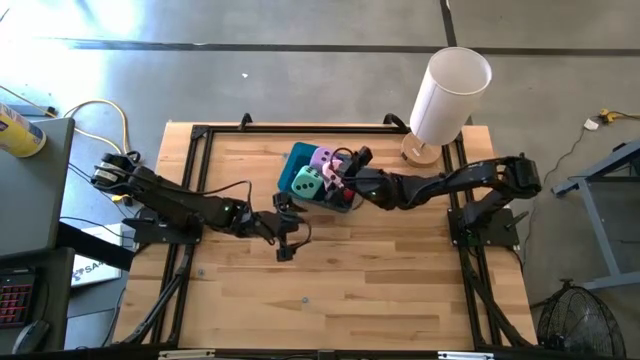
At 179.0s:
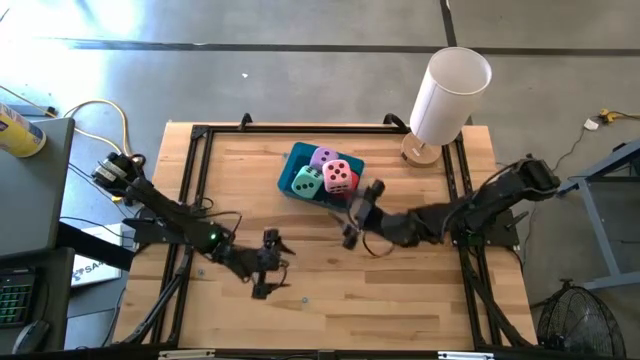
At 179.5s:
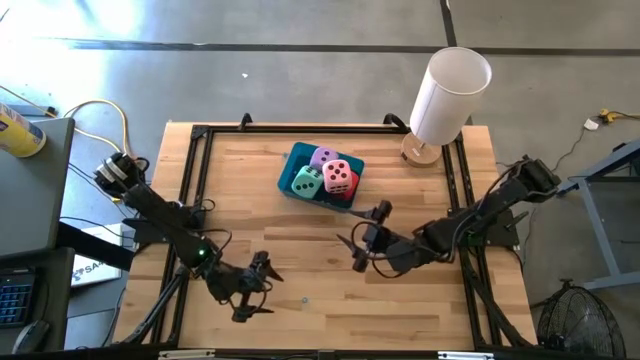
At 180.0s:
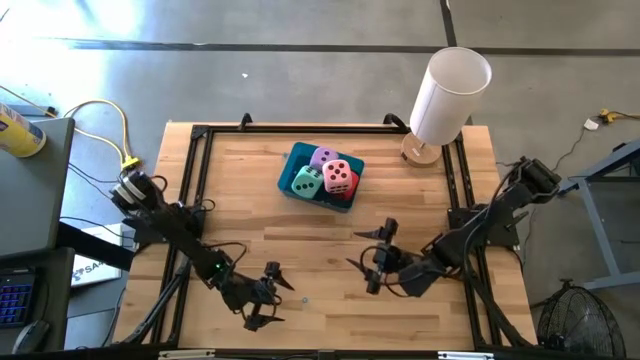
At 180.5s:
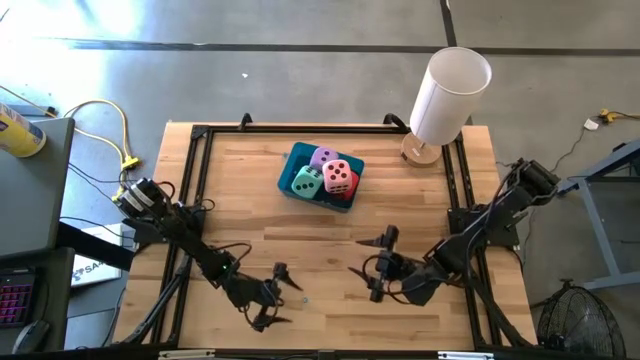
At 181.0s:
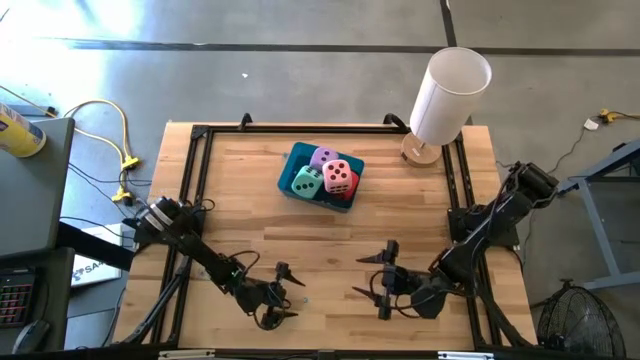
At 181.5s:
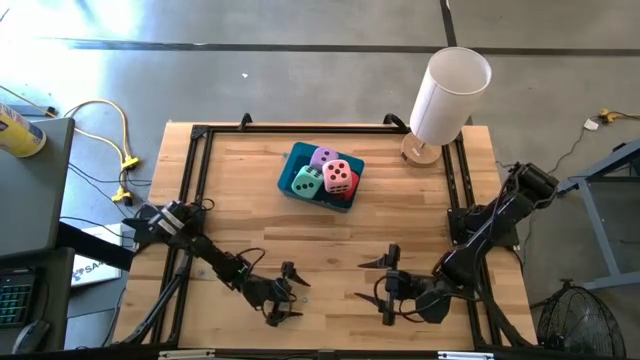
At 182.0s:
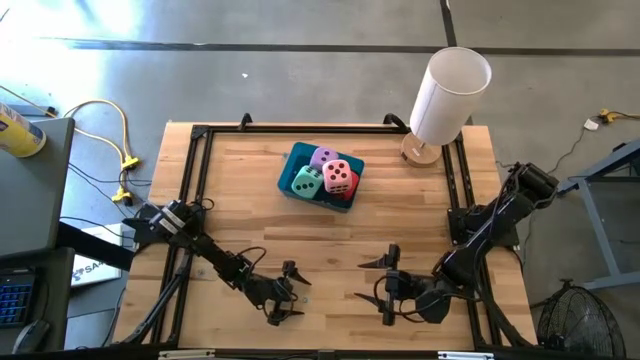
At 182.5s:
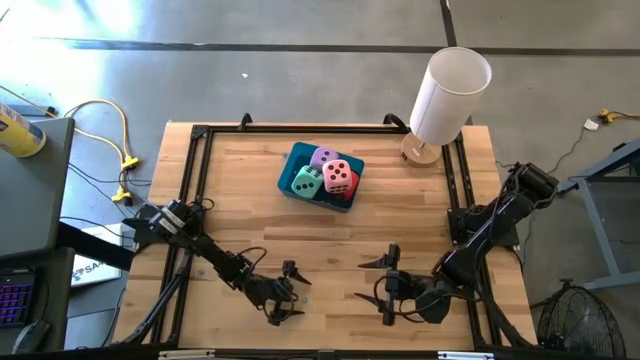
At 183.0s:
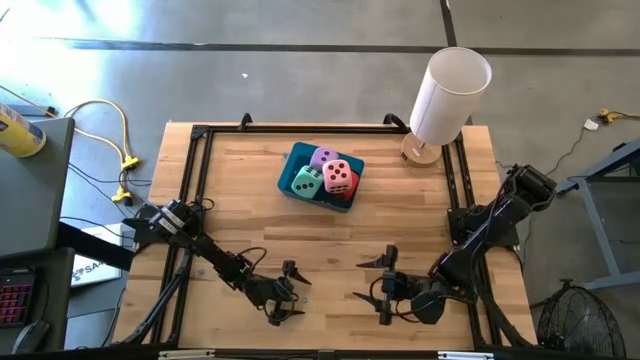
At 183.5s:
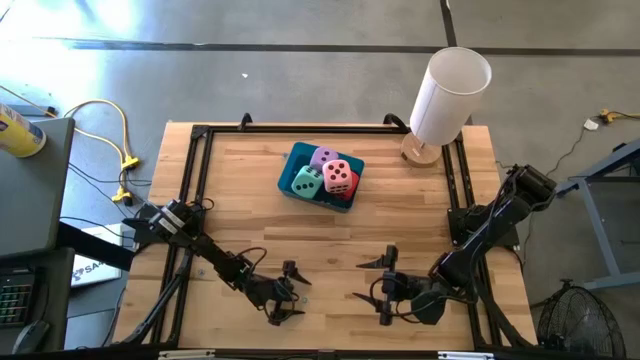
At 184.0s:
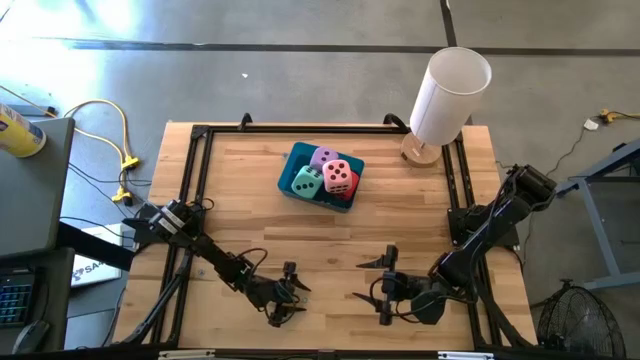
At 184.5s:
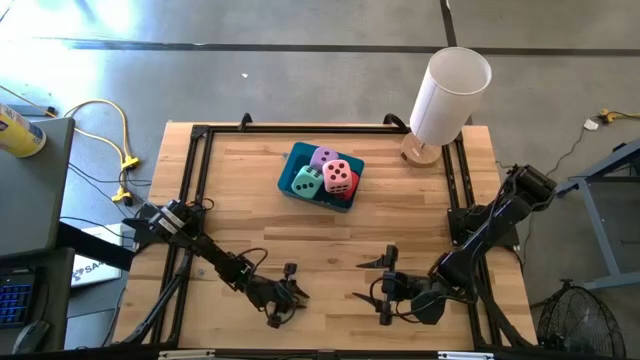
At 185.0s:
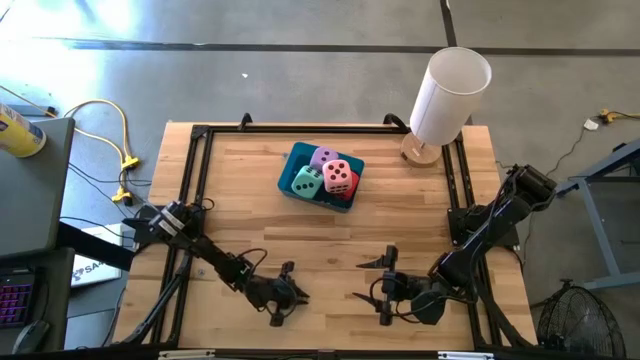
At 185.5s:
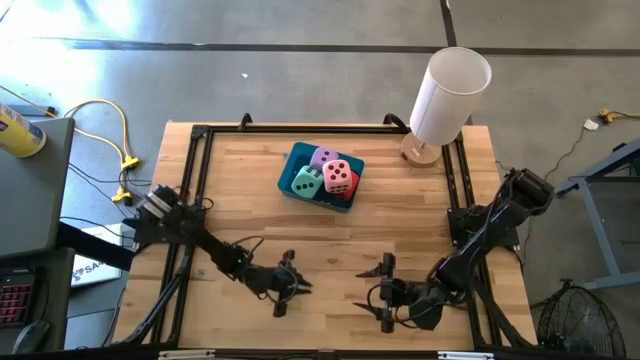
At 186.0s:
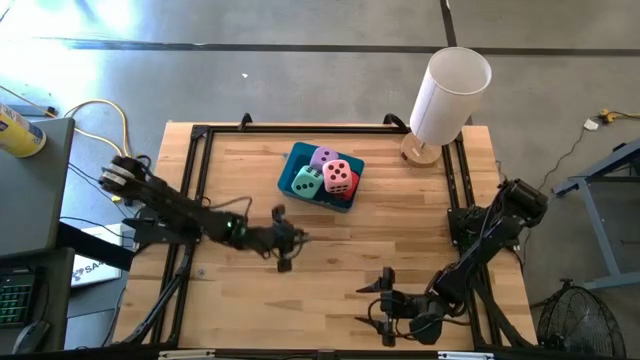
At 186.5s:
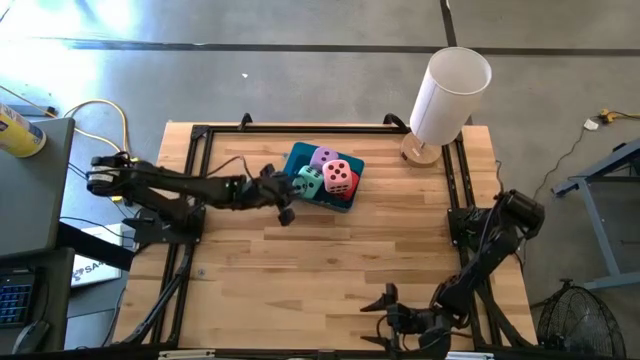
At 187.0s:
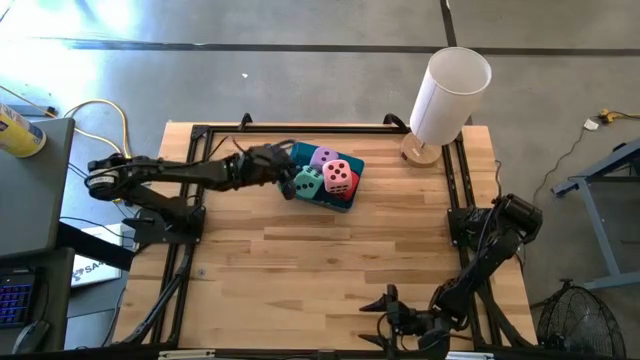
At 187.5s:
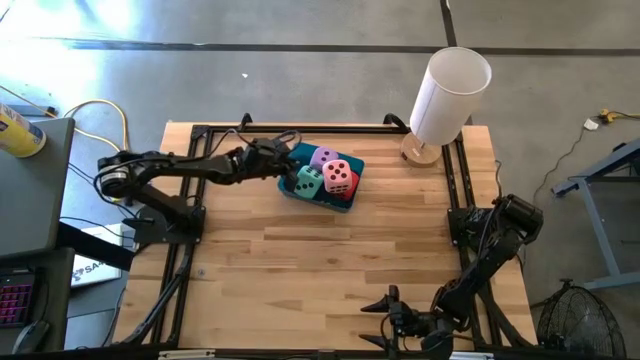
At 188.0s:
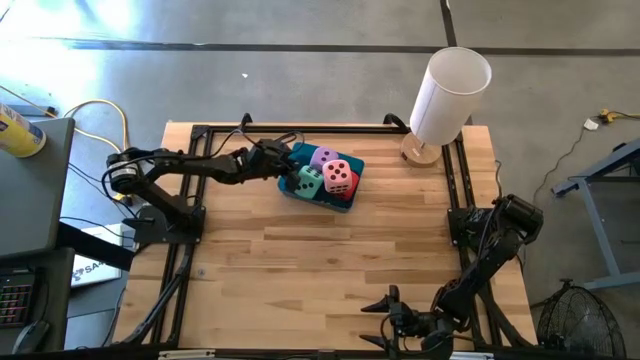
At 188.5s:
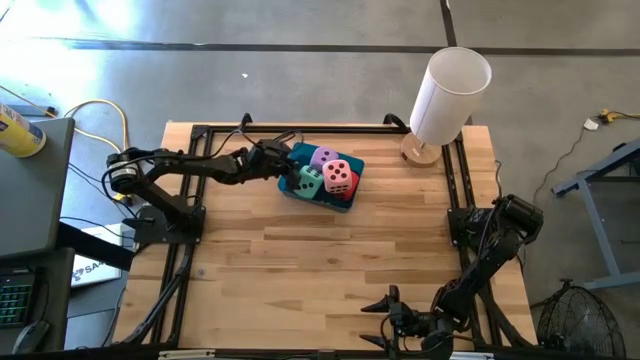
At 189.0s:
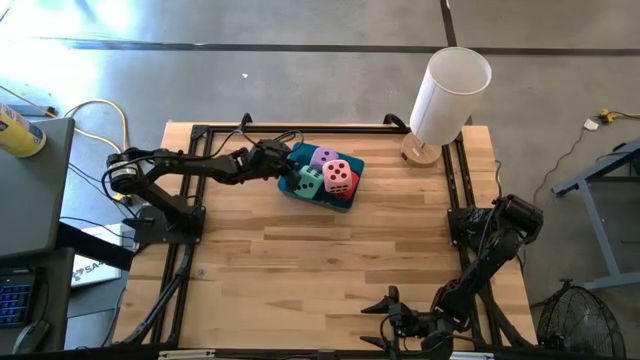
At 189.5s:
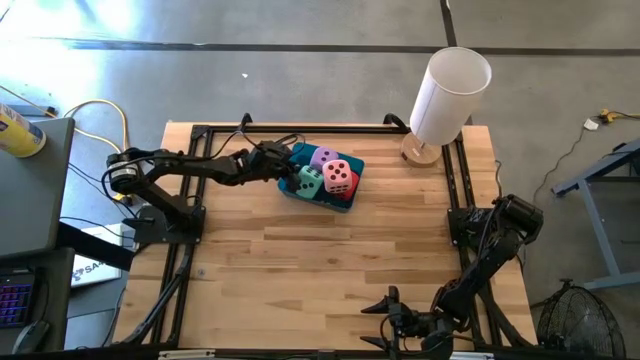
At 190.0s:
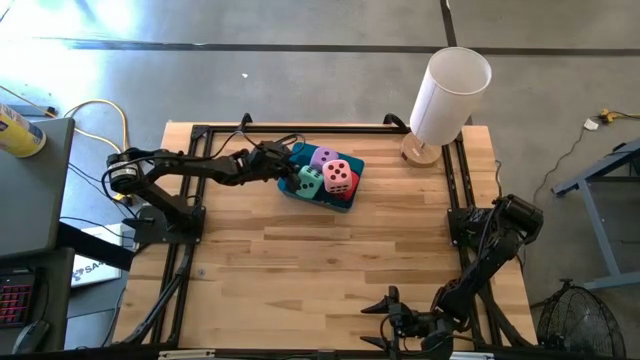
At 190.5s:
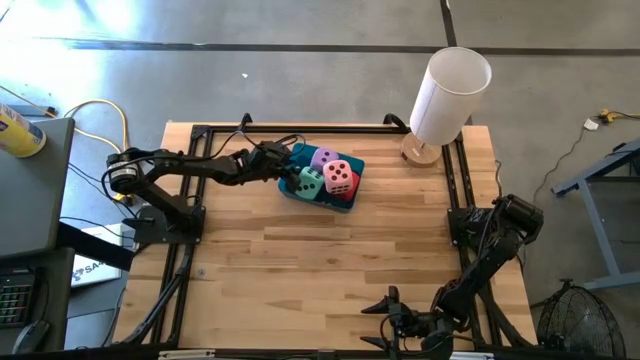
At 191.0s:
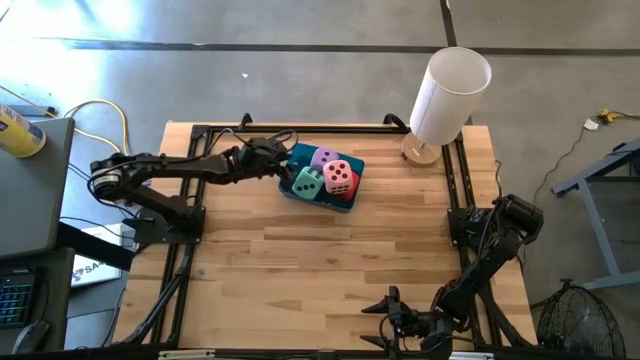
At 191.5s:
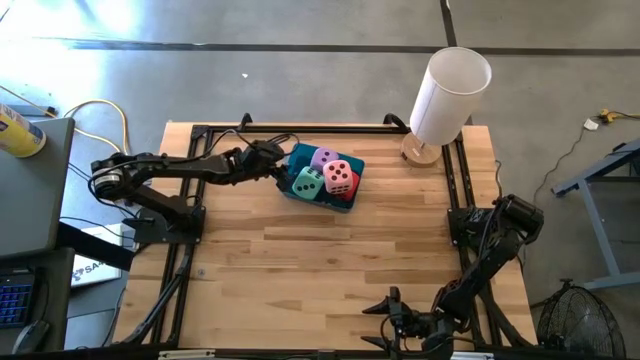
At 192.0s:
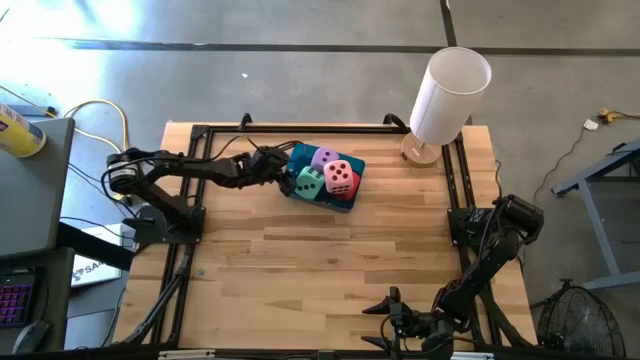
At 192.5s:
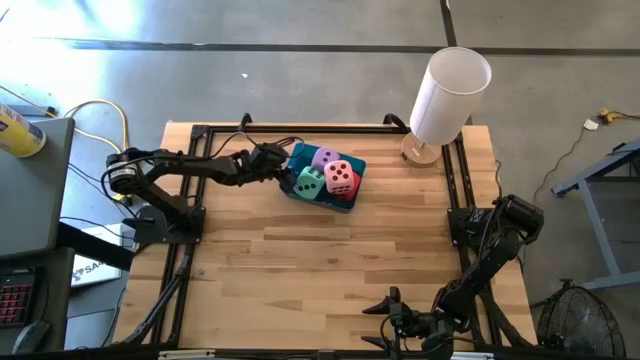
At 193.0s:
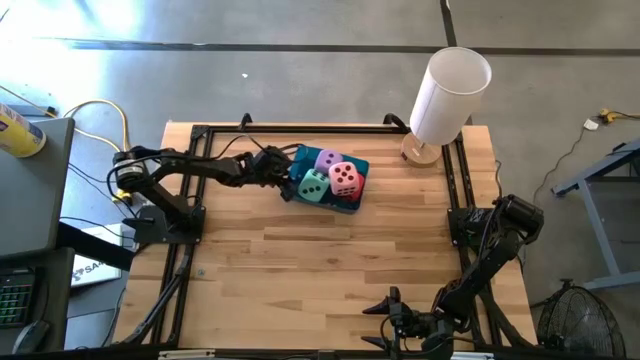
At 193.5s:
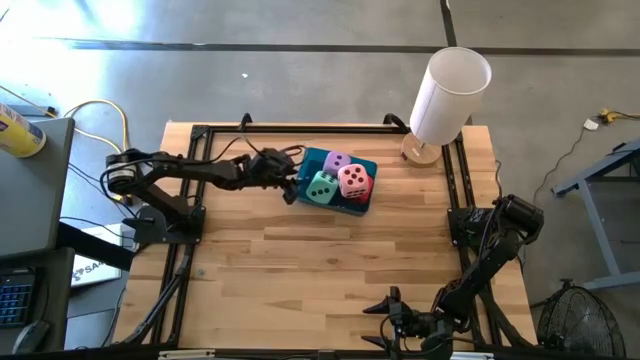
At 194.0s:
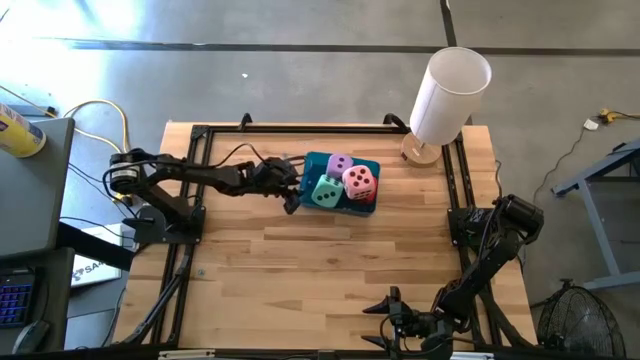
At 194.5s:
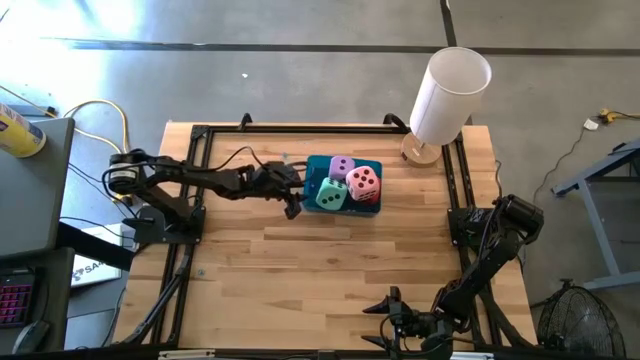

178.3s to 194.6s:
Task: Pick & Place Dice
Put the small blue dice into the blue bin

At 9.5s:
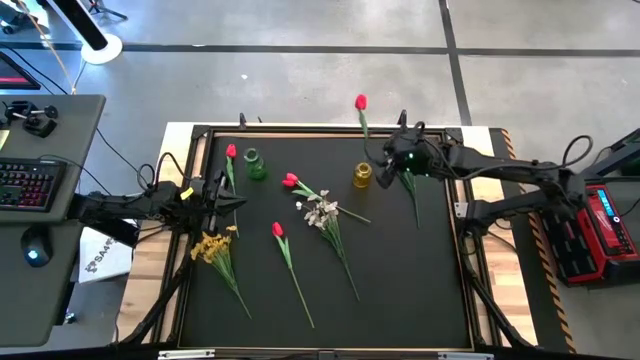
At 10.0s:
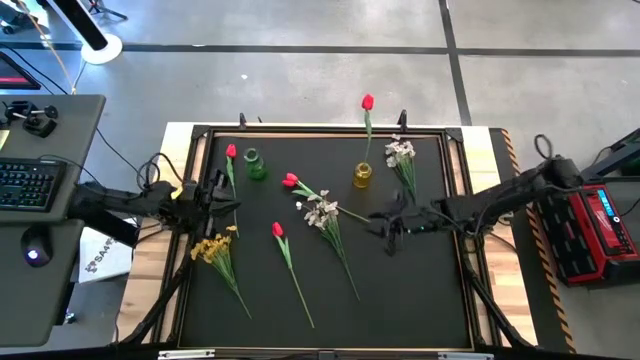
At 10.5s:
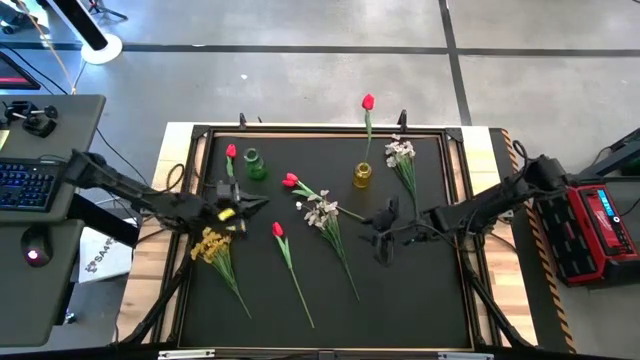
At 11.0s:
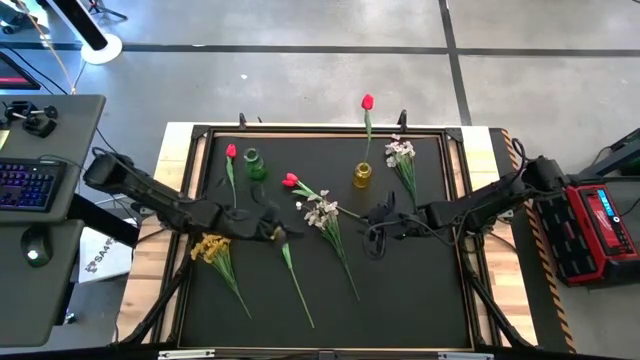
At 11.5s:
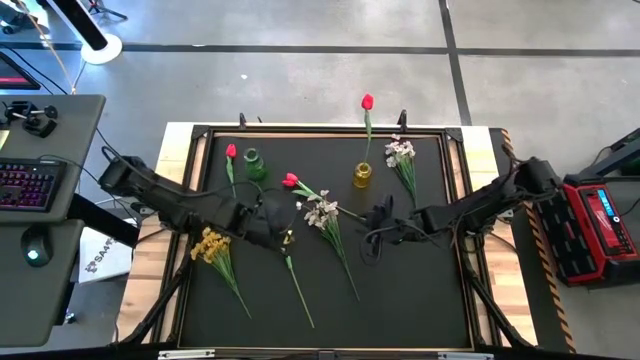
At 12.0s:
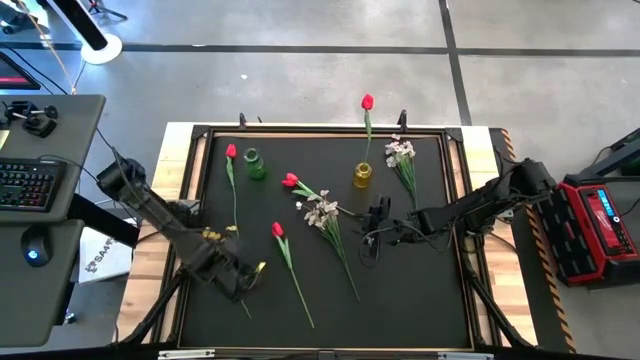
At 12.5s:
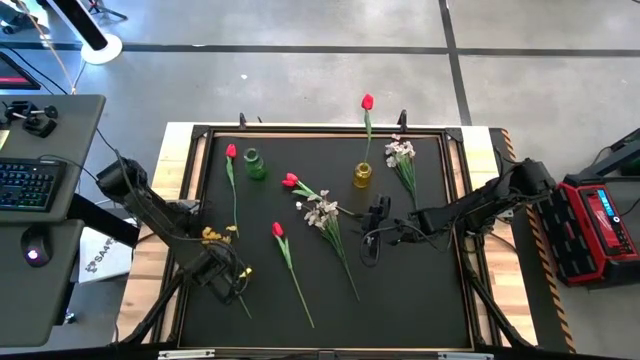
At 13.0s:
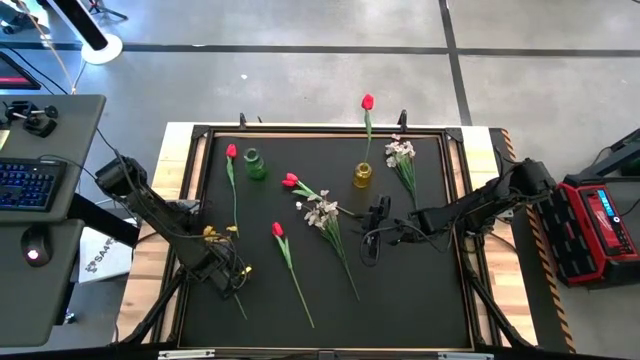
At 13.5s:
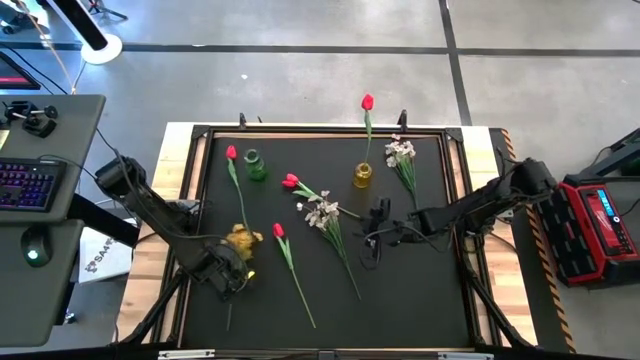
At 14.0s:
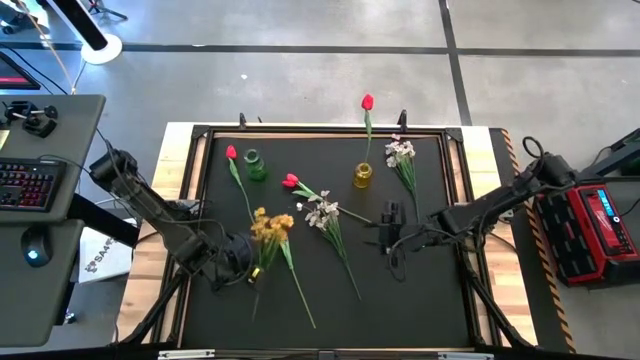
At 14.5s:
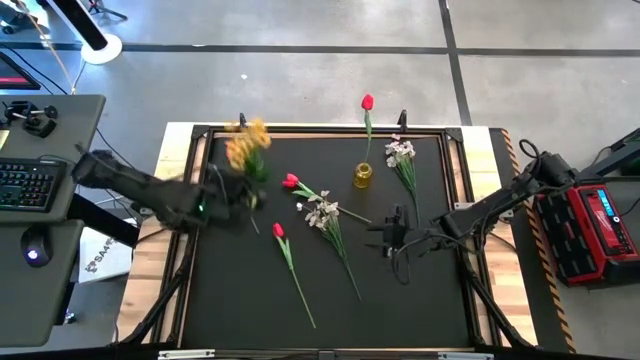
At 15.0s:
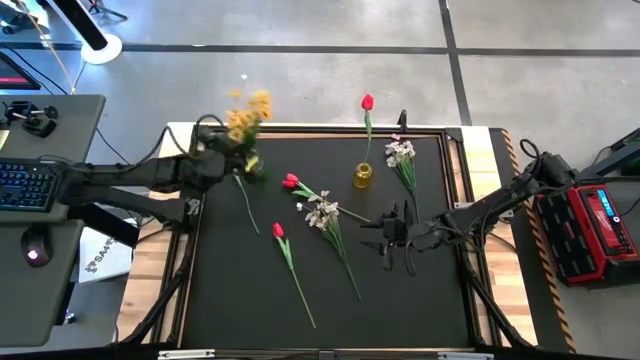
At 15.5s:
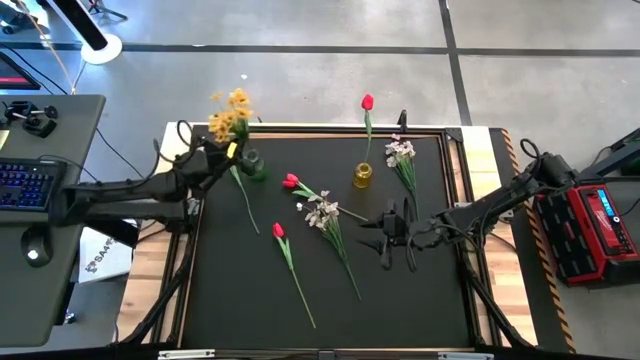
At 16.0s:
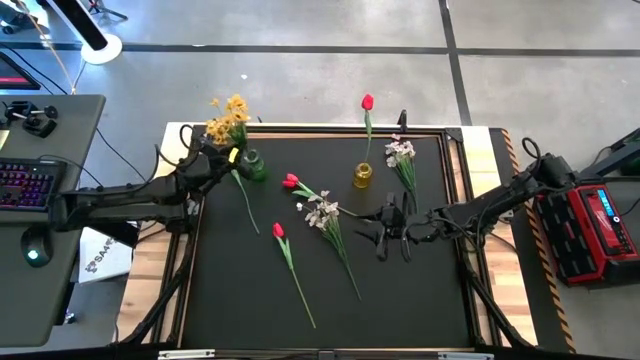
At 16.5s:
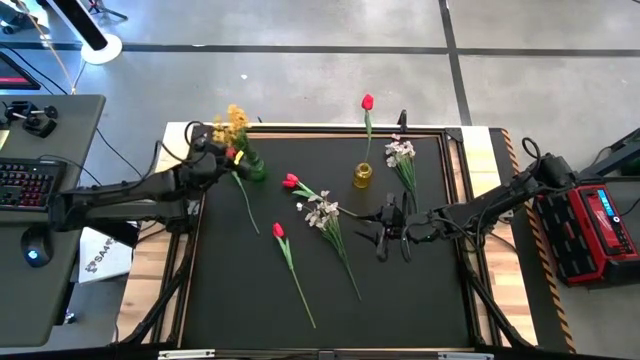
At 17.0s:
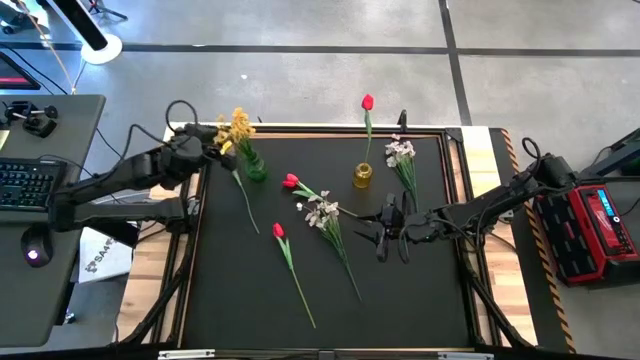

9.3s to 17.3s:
Task: Sort flowers into vase by color
Put the yellow flowers into the green vase
